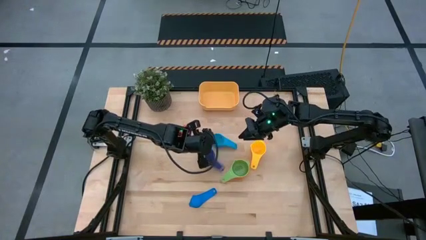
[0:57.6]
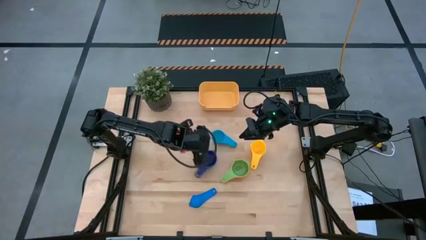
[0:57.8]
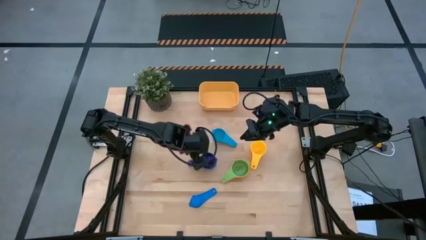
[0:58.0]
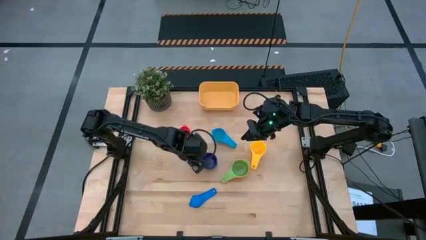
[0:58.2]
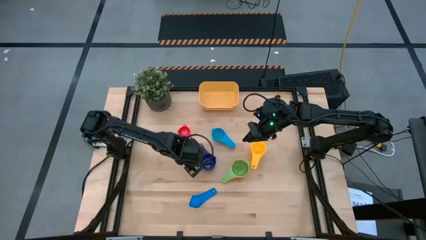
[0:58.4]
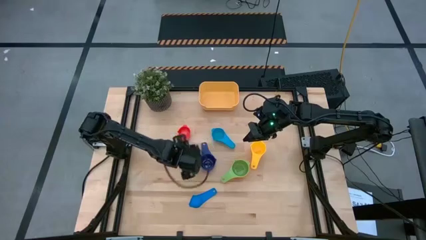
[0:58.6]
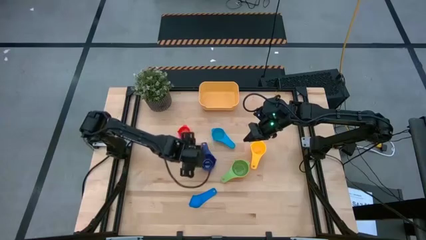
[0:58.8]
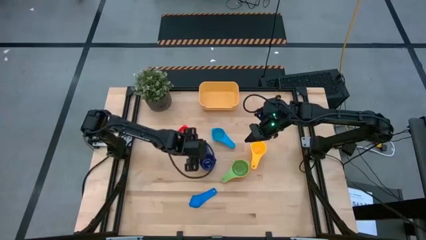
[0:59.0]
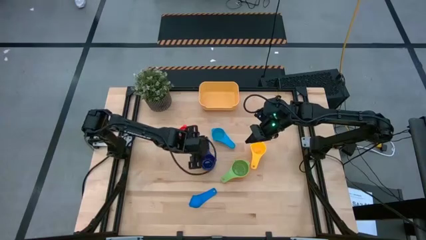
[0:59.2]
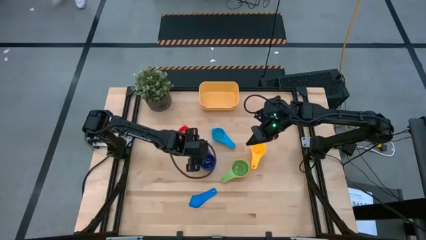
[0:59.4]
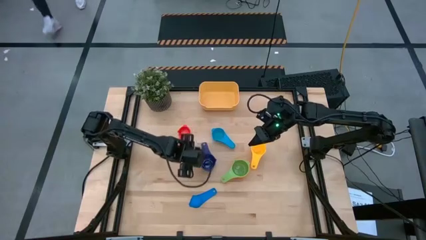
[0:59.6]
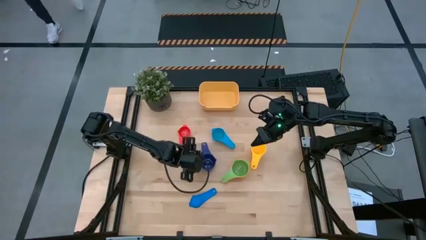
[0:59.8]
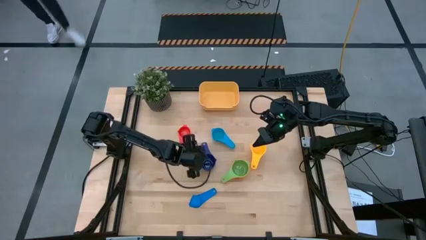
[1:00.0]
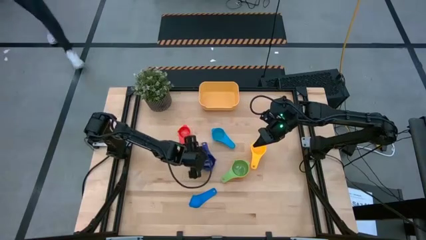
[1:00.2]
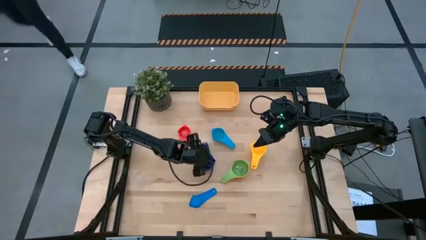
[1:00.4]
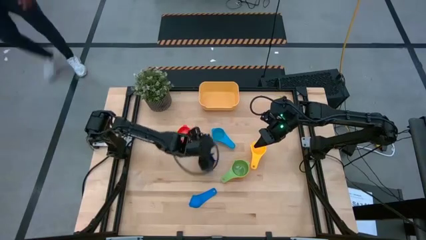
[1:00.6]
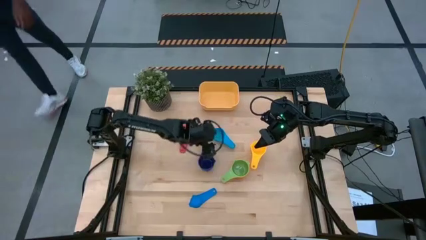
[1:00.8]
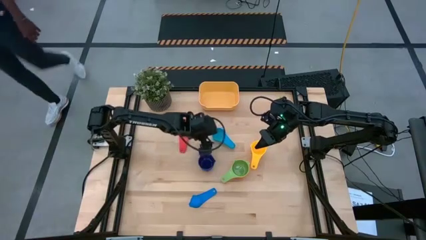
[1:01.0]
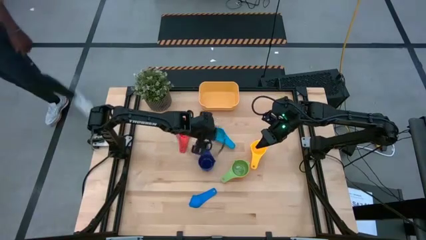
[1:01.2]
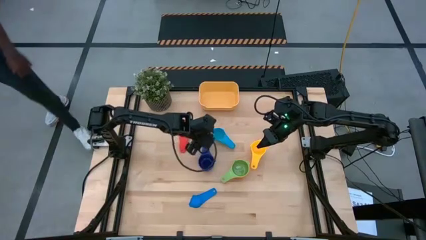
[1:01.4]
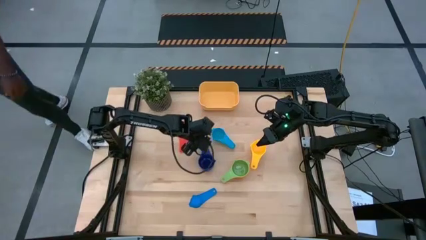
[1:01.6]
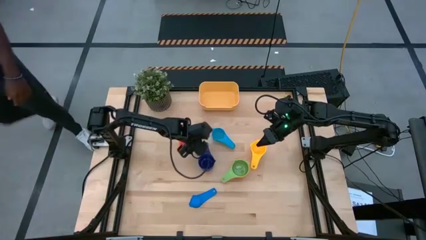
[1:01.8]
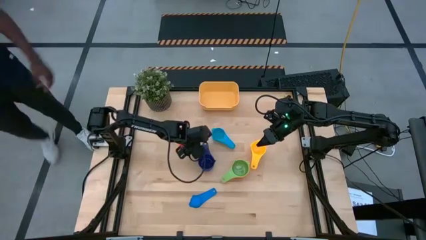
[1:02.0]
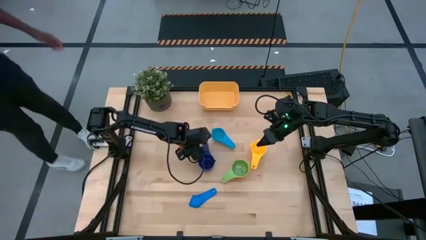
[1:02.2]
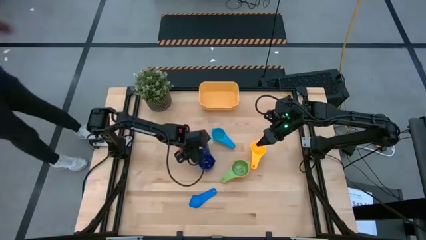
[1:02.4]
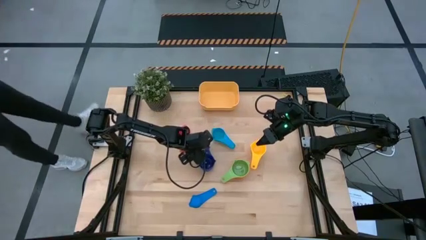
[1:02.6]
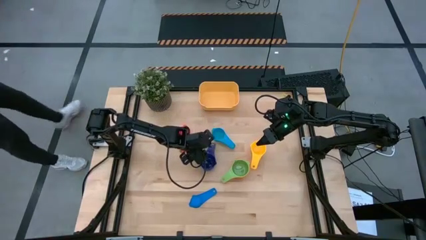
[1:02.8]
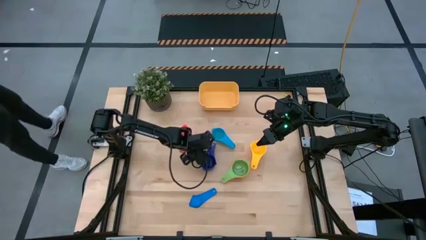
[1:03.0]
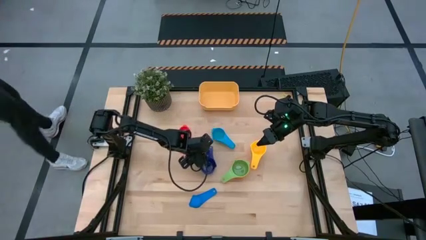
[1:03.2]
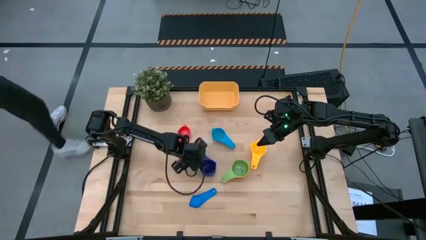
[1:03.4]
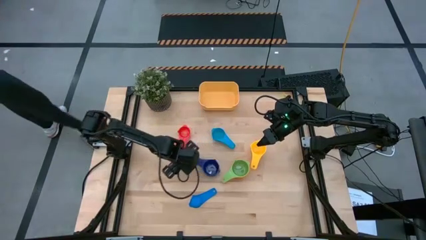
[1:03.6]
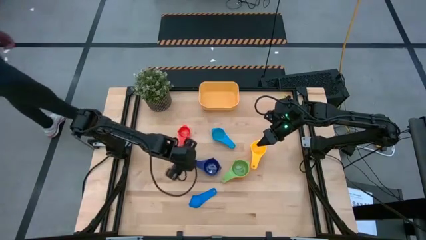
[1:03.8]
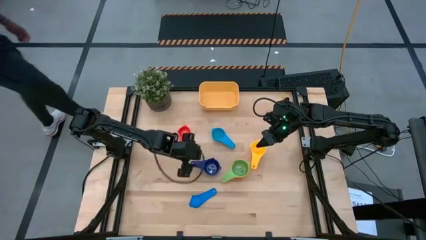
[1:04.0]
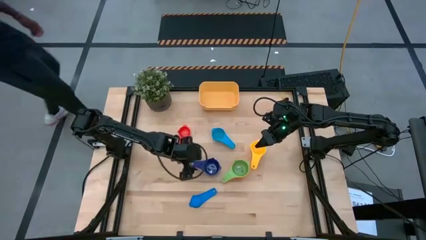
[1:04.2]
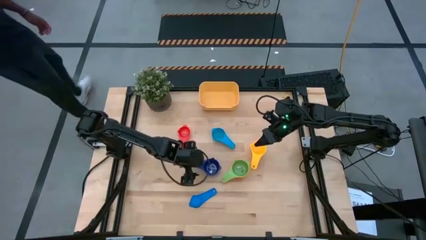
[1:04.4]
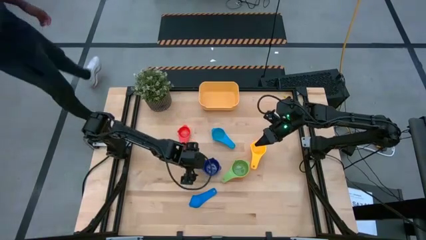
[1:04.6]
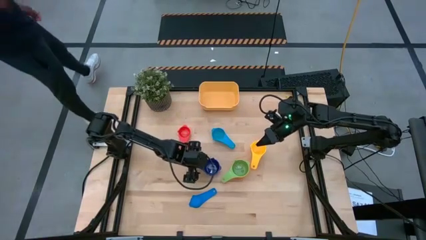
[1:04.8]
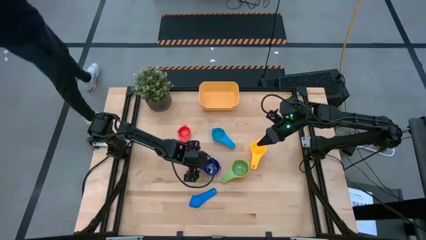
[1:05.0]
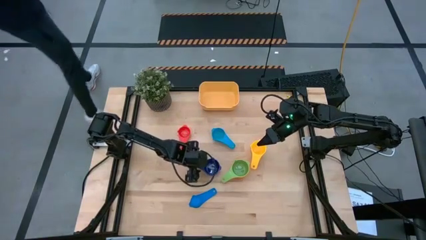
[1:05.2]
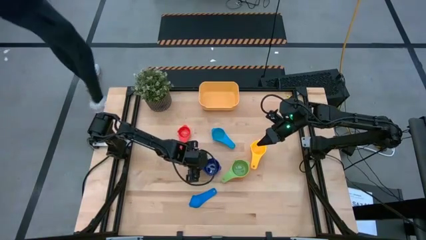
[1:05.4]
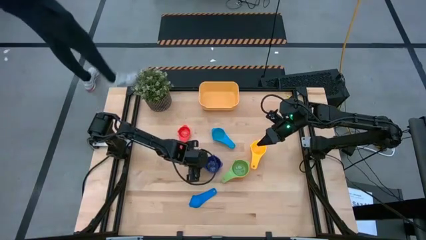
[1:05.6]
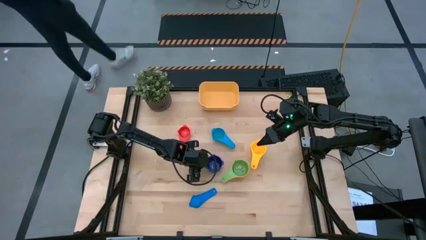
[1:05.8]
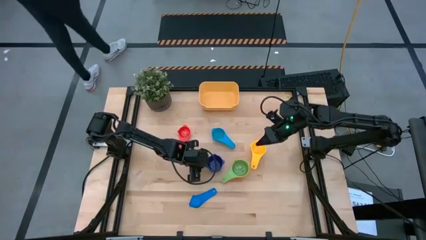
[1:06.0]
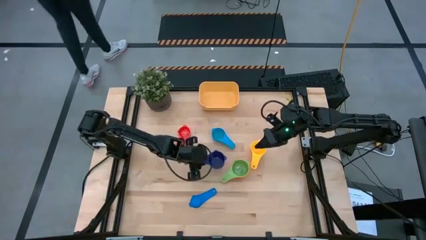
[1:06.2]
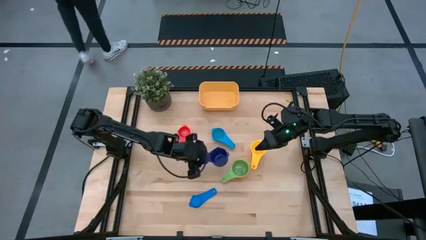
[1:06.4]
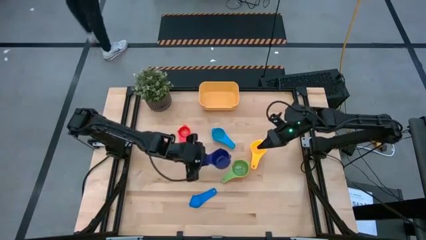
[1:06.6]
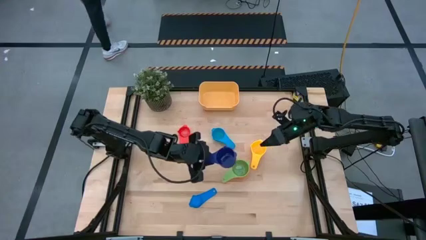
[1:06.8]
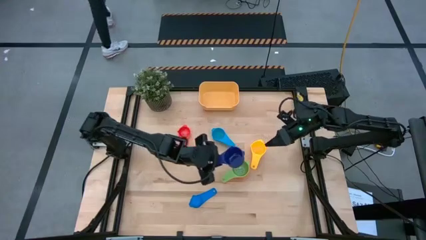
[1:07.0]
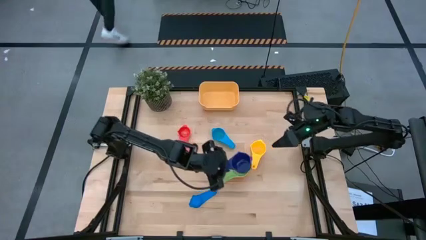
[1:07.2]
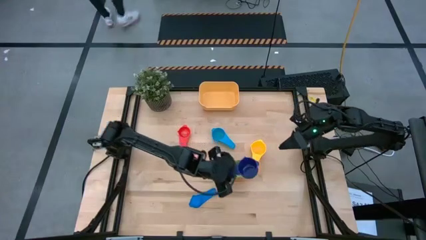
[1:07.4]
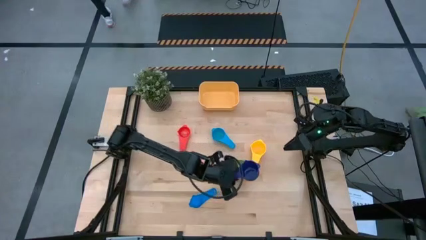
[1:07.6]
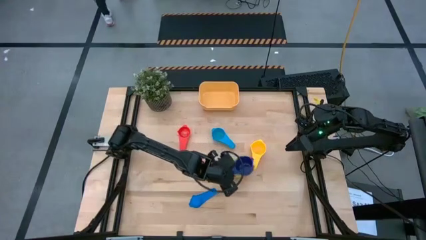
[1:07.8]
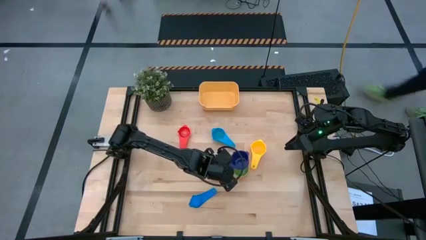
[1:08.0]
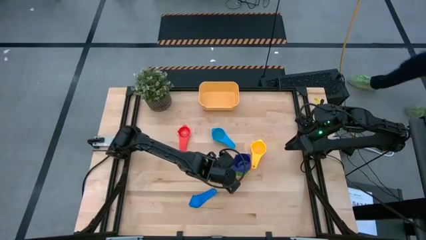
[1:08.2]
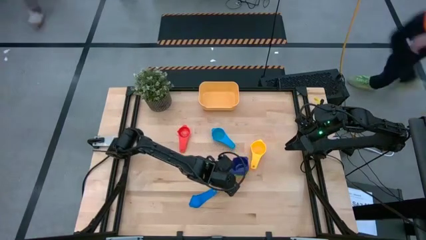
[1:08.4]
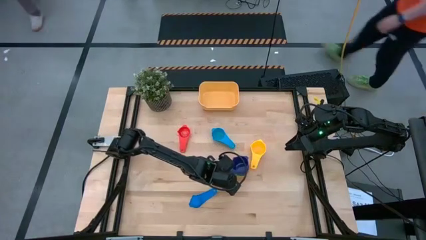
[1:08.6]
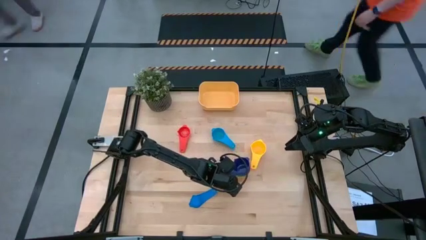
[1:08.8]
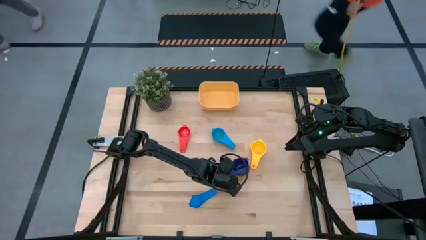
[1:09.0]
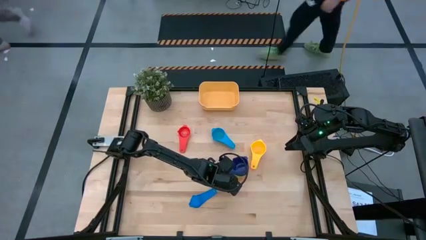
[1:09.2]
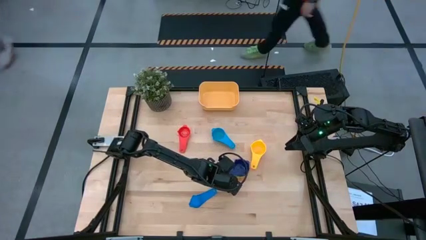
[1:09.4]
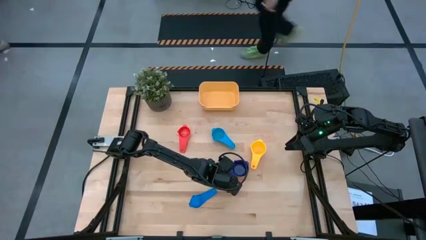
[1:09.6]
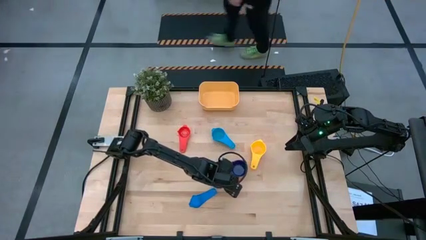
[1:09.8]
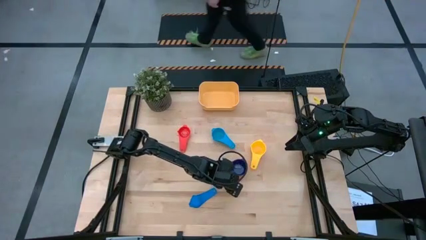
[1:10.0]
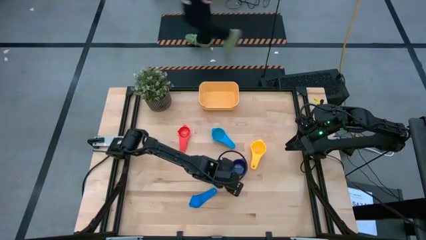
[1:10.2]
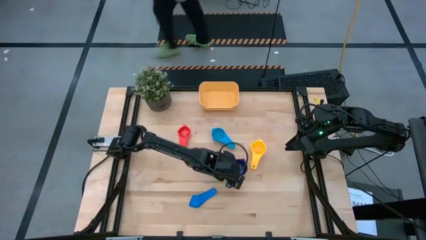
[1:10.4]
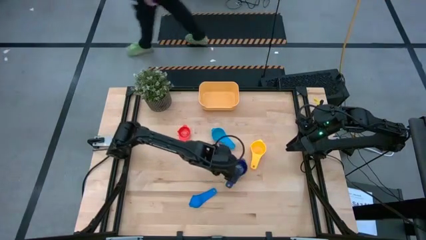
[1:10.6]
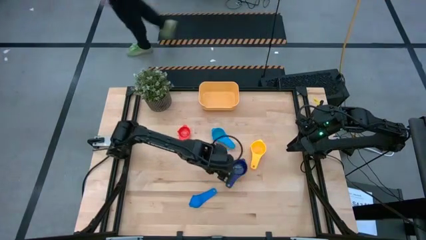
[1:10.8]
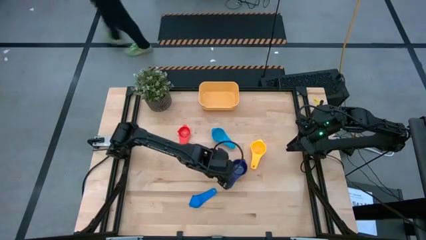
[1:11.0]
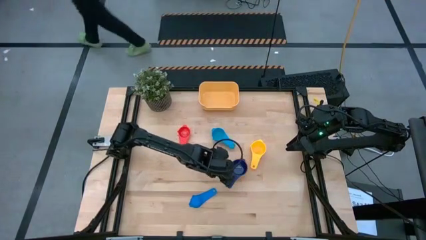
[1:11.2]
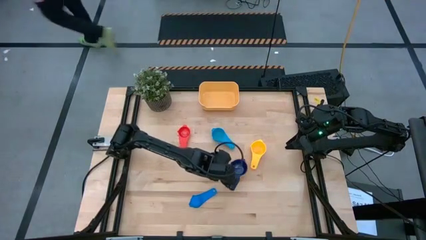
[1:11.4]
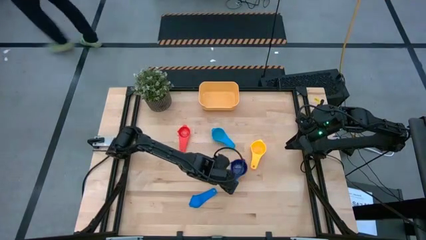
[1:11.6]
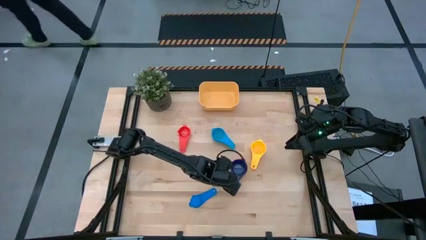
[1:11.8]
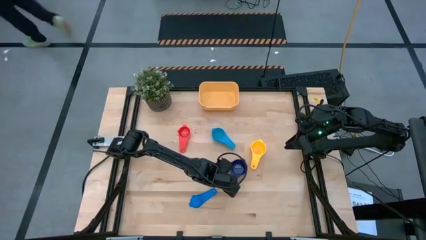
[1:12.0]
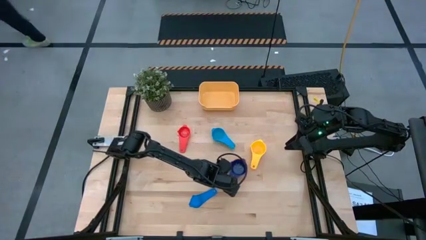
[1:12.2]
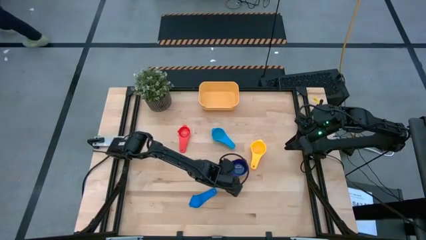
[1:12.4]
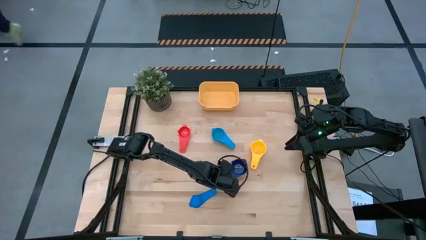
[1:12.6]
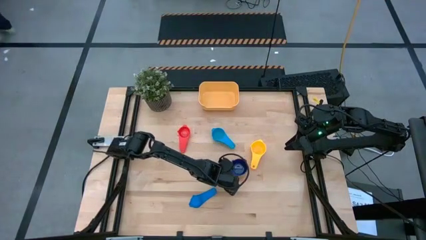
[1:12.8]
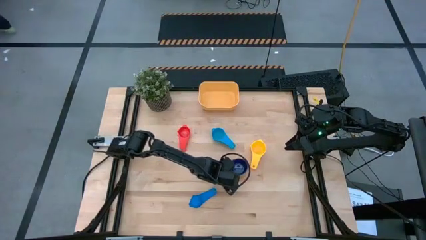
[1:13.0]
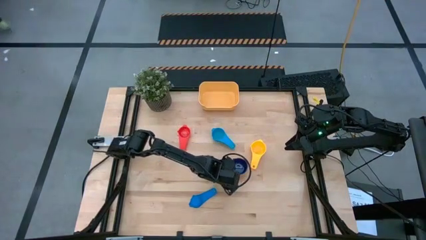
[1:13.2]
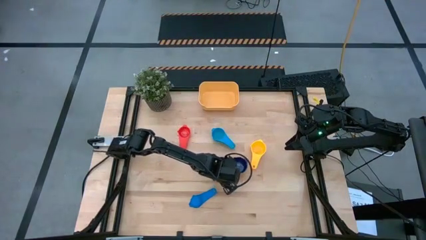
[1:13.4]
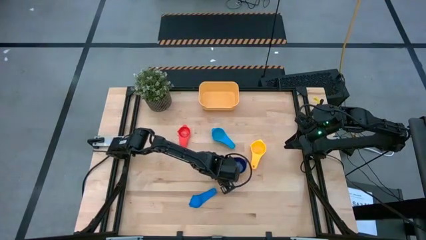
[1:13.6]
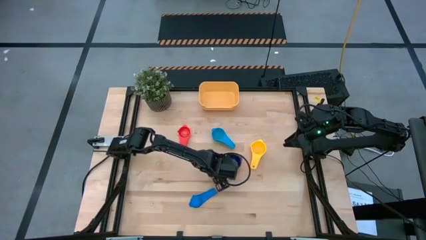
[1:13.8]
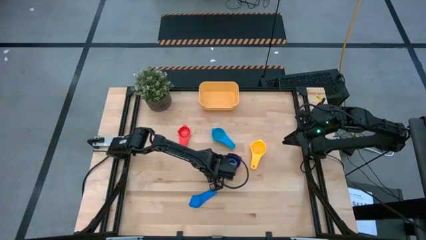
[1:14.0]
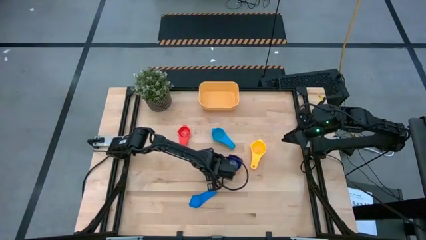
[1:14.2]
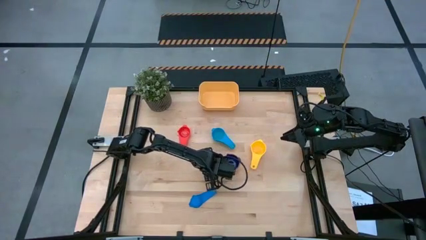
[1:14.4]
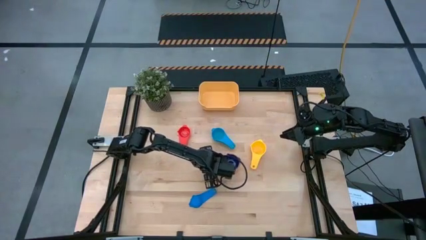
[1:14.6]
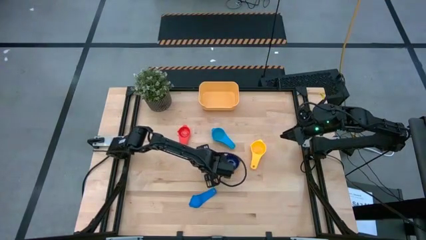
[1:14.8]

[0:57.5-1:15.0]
Task: Nest measuring cups in basket
Stack the dark blue measuring cup on top of the green measuring cup
